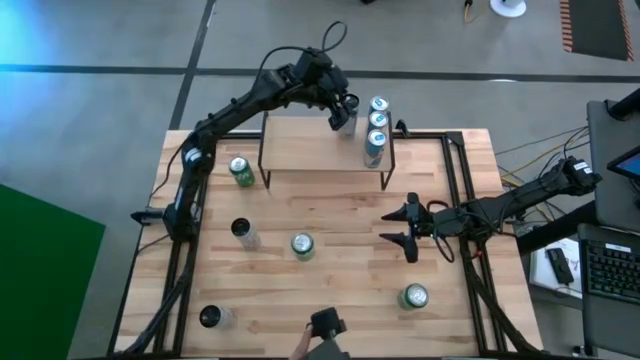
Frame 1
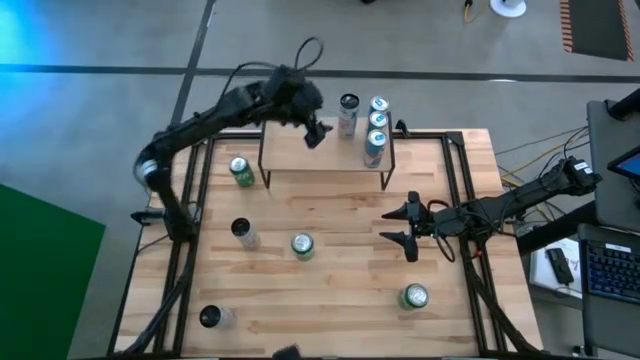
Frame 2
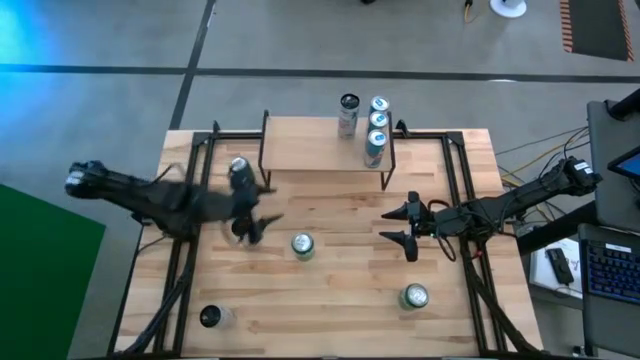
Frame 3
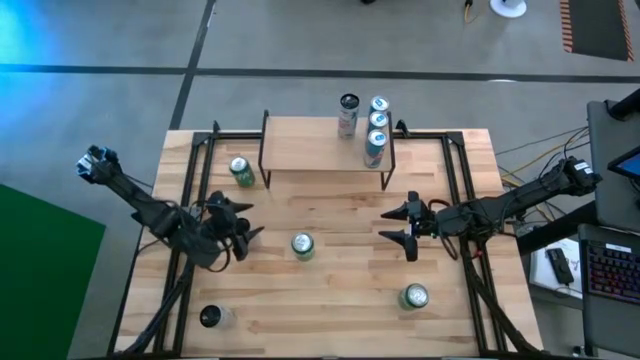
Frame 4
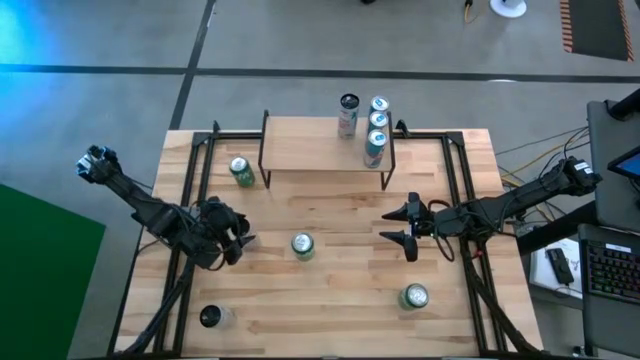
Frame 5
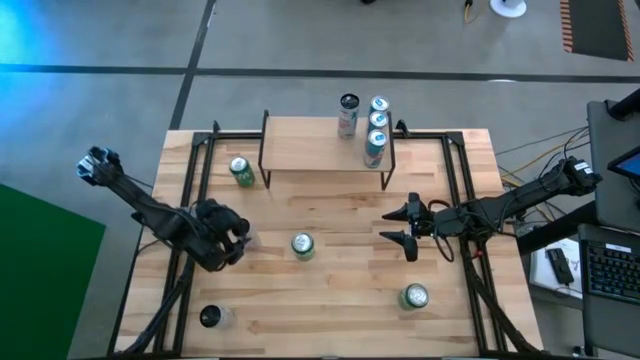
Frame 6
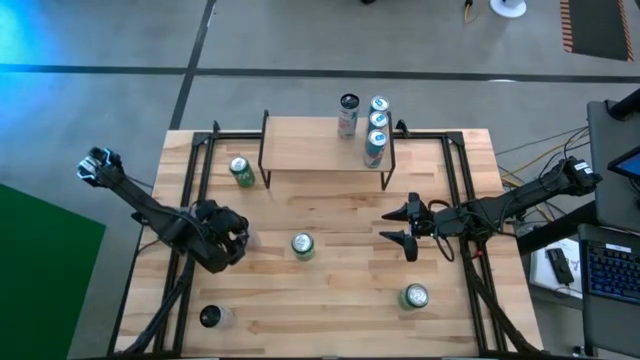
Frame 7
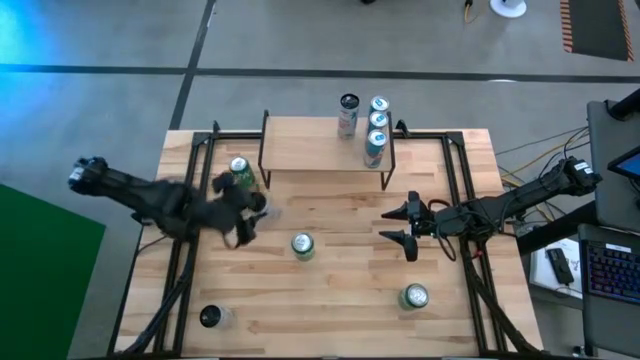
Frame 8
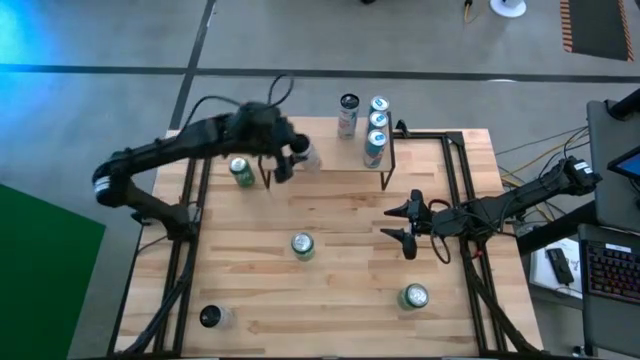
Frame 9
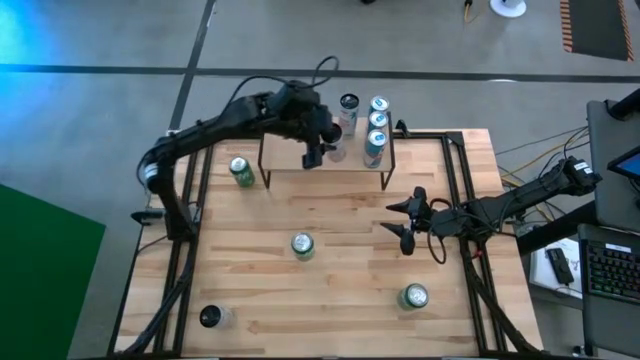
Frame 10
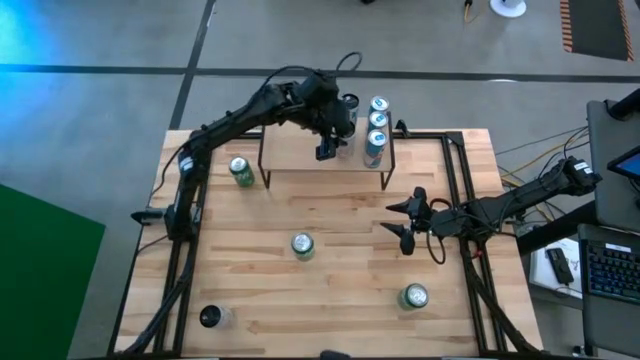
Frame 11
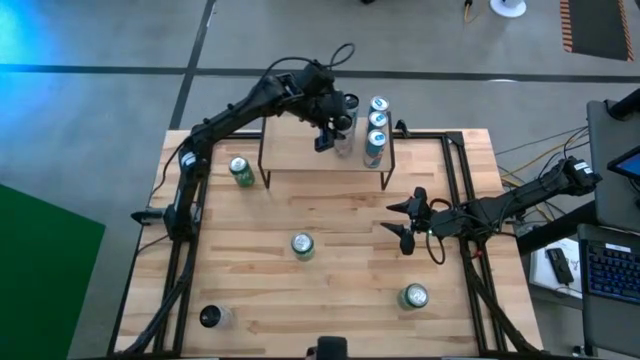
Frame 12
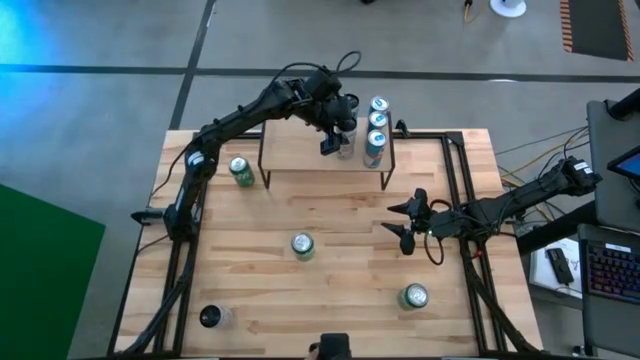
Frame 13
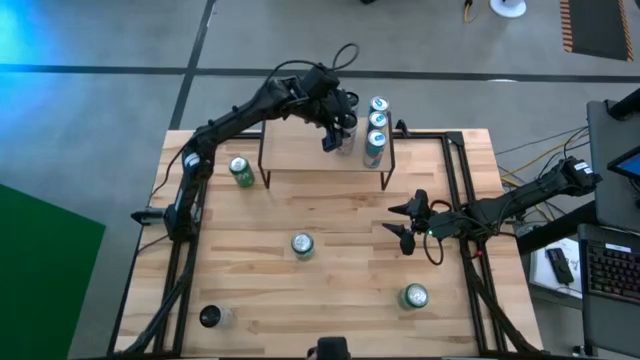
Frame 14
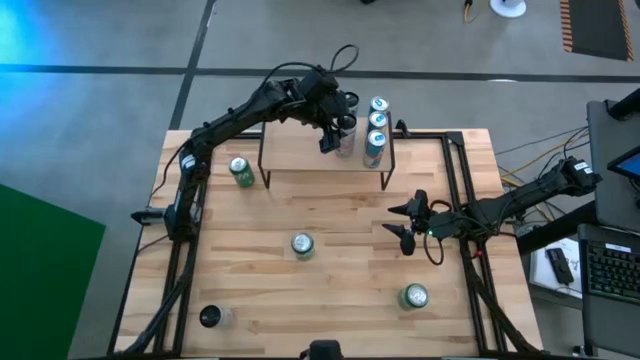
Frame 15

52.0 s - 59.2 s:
Task: Sort soda cans
Put the top white-pink soda can on the shelf and align it with other white-pink soda can

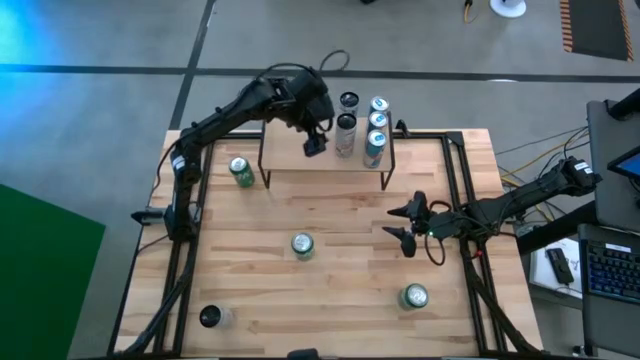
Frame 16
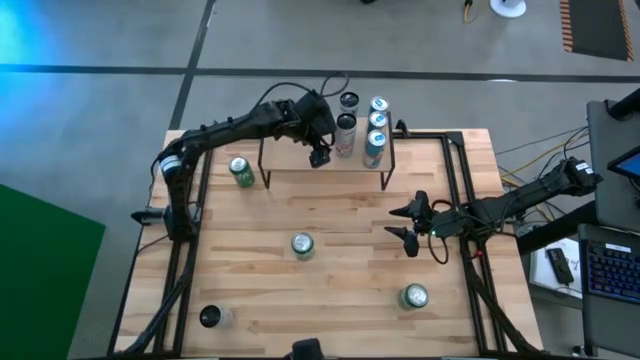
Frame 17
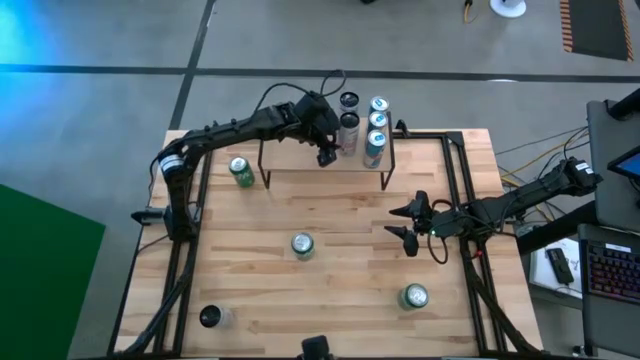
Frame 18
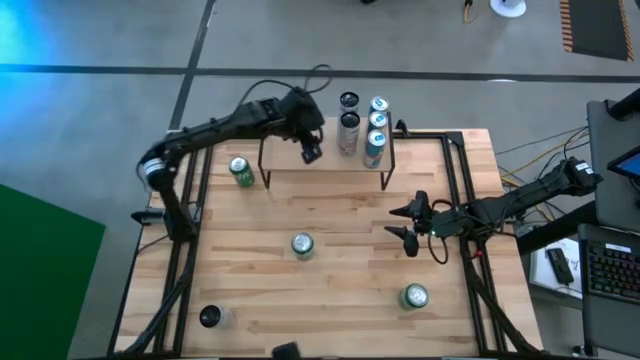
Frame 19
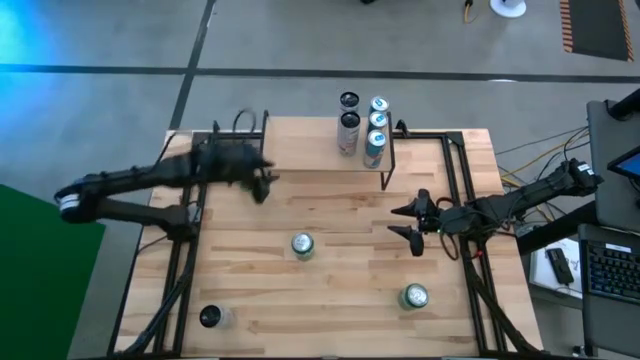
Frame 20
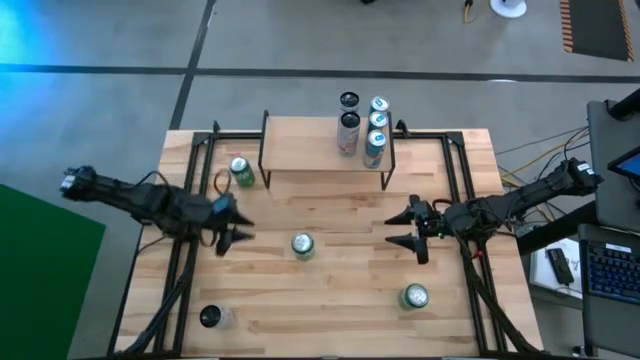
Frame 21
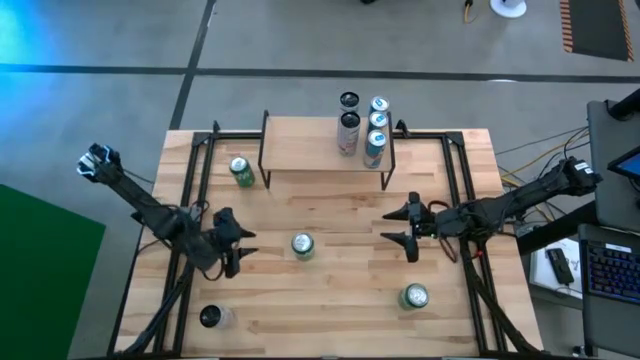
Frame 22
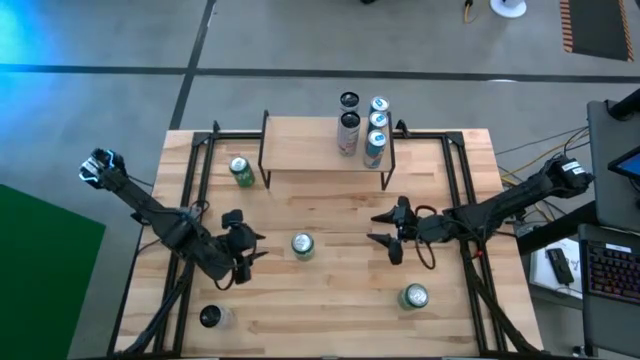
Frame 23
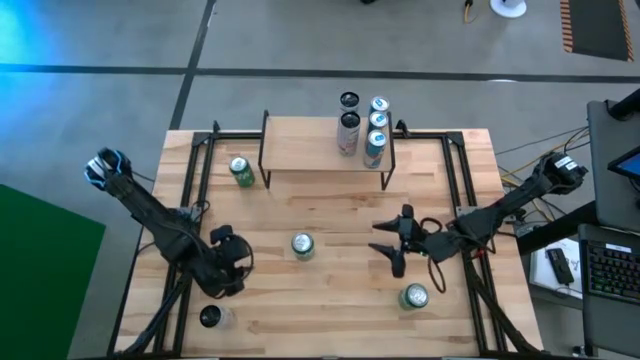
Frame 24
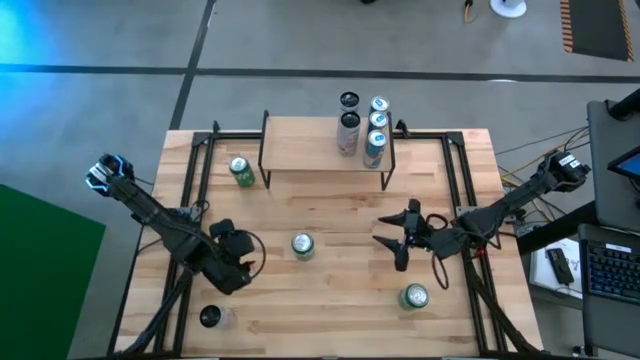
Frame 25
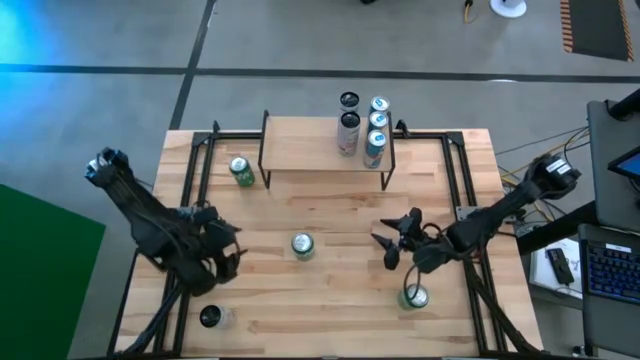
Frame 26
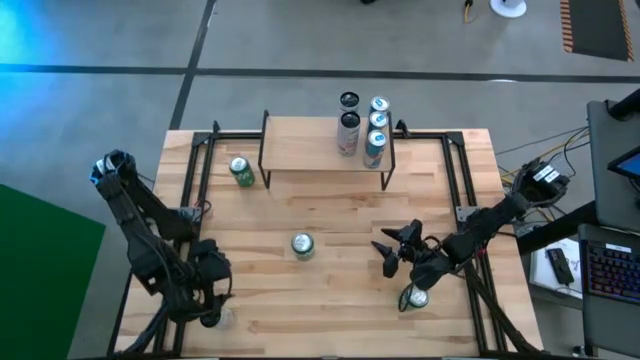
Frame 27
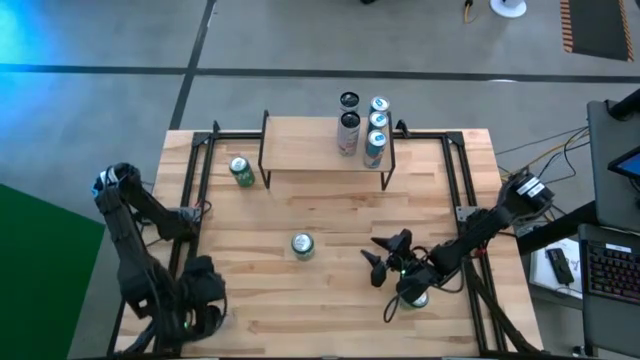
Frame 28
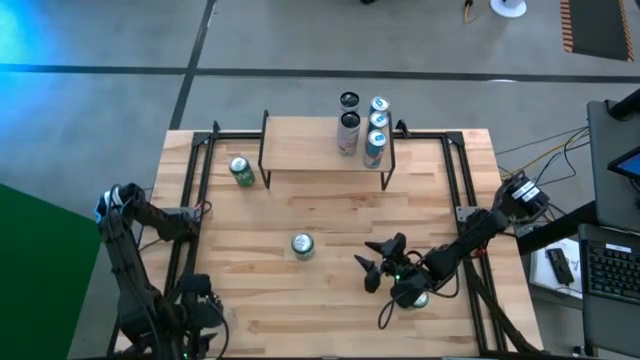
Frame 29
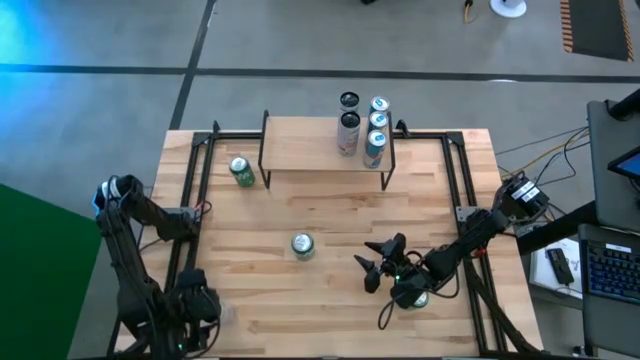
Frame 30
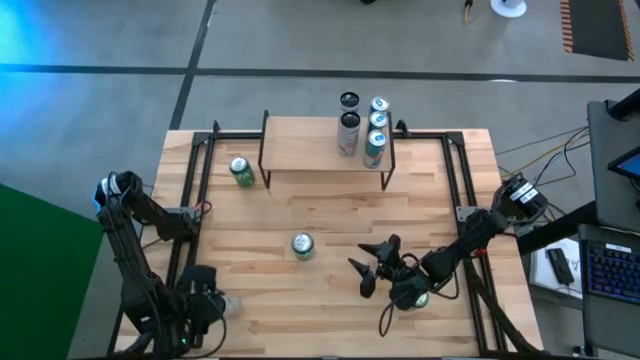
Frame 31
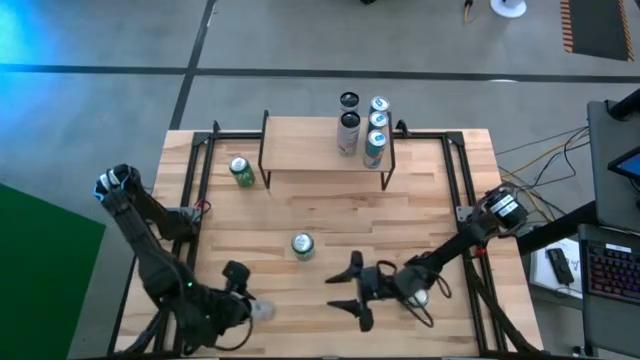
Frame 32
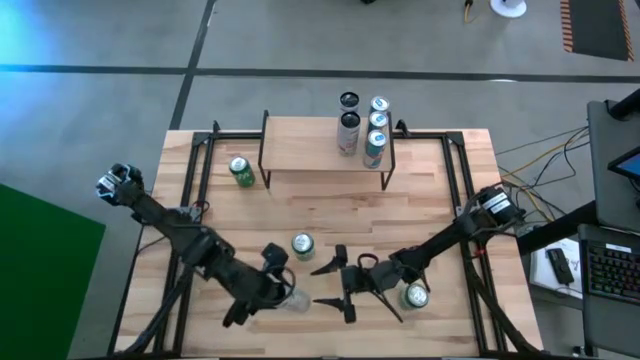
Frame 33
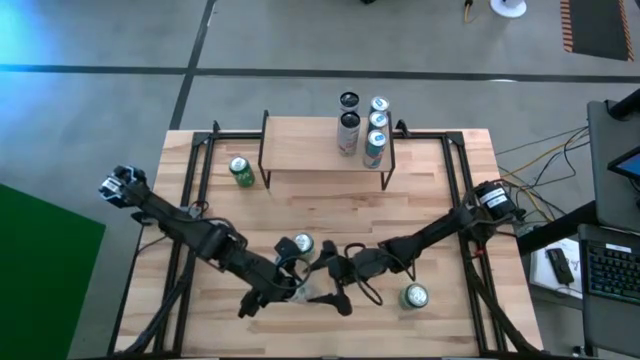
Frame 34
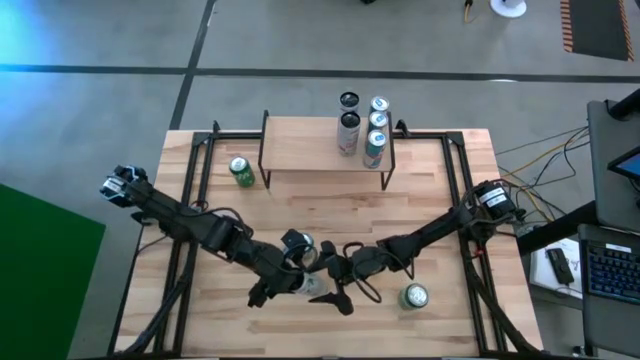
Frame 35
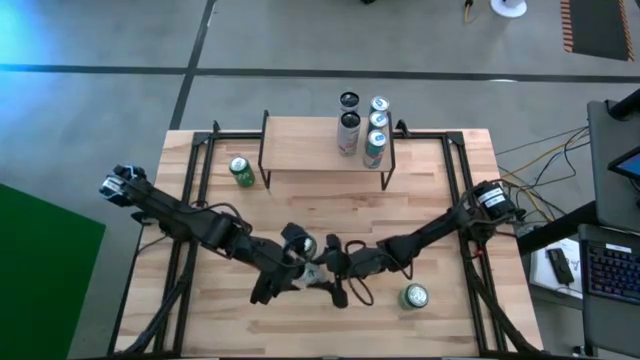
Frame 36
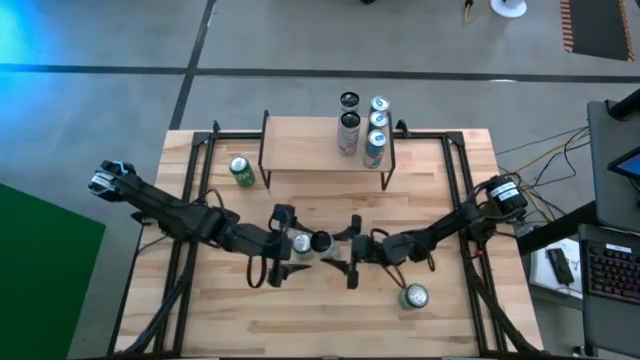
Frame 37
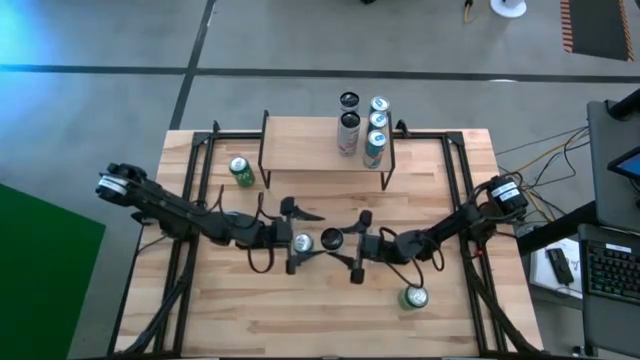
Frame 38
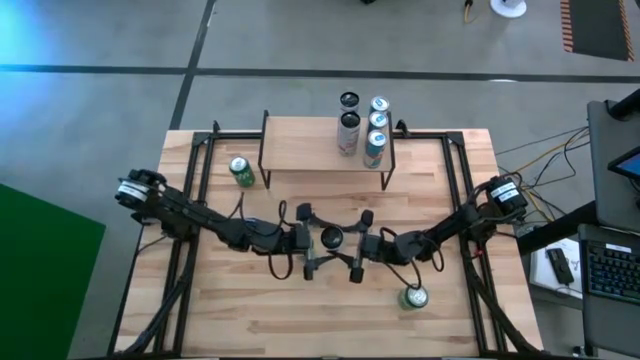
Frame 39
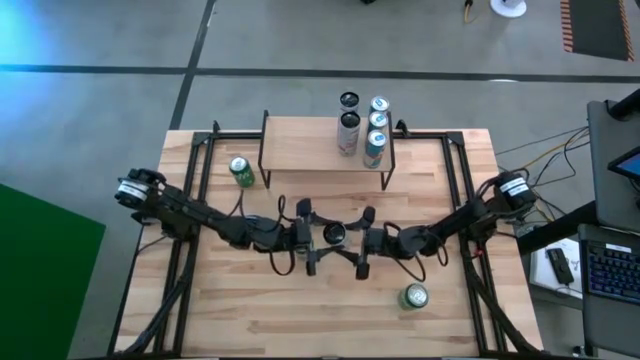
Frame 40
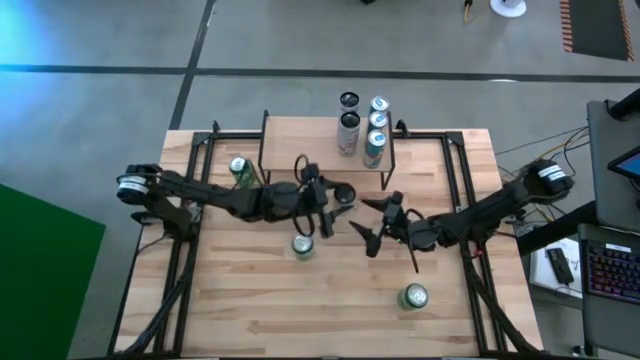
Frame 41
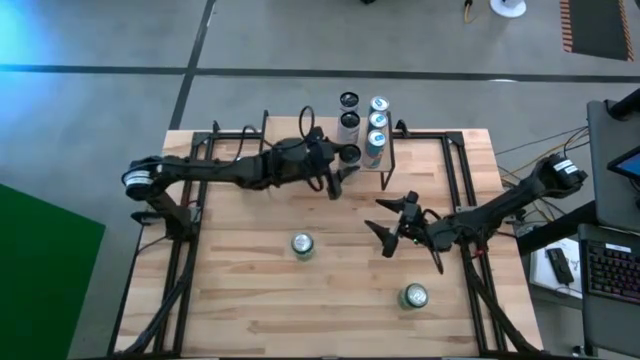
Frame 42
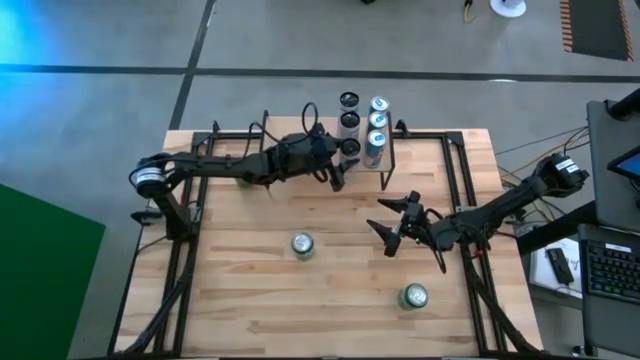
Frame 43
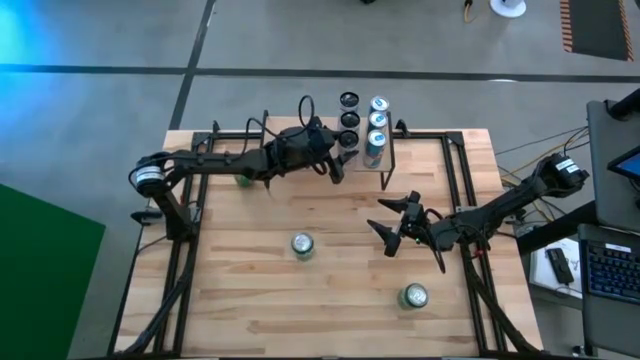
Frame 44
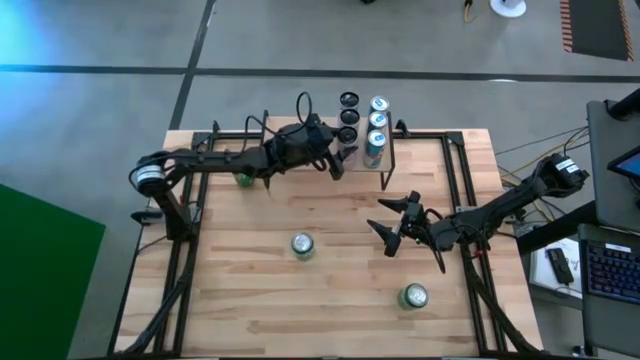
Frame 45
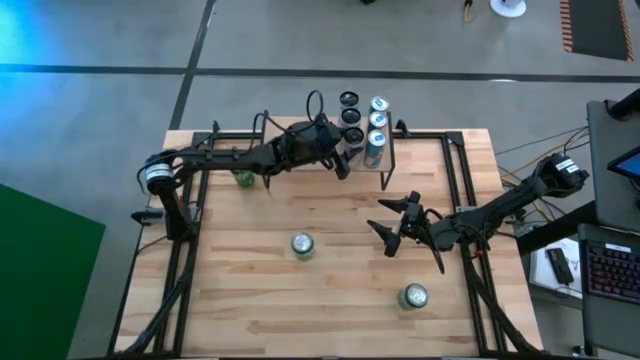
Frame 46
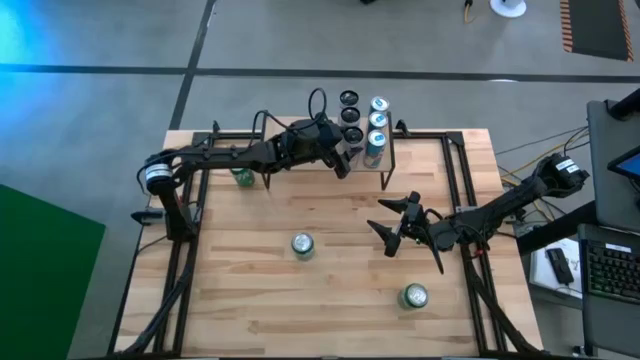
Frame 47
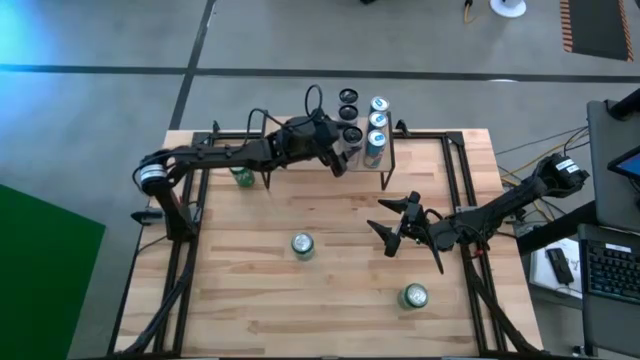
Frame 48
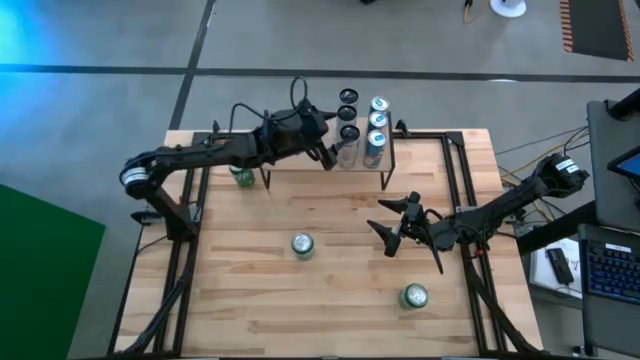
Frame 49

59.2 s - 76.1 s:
Put the white-pink soda can on the shelf and align it with other white-pink soda cans
